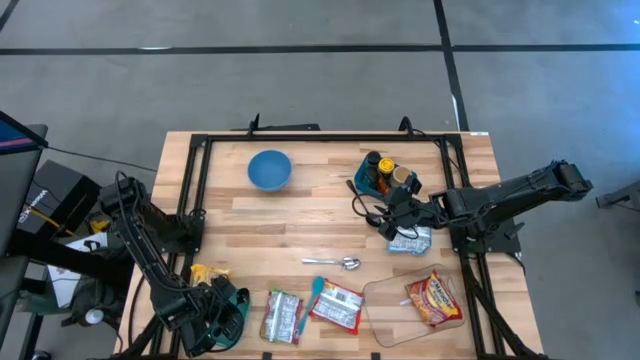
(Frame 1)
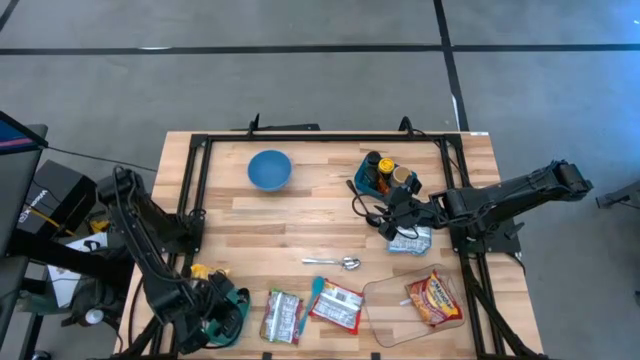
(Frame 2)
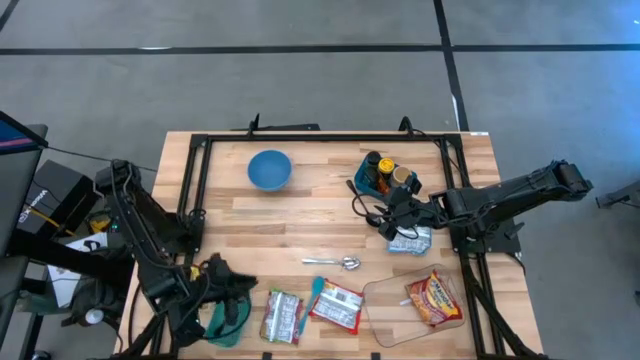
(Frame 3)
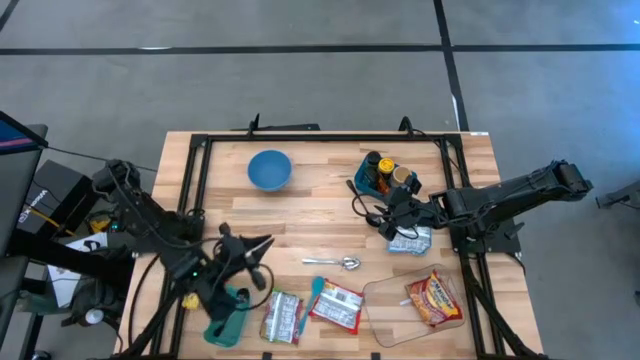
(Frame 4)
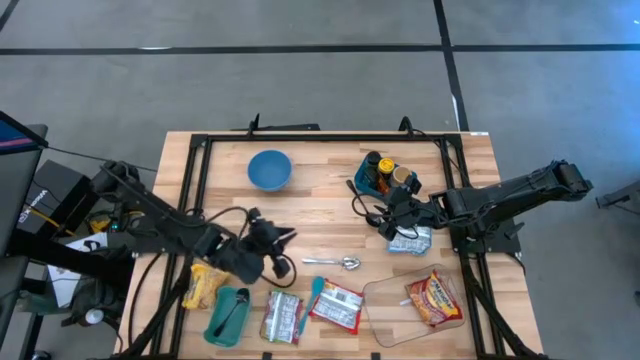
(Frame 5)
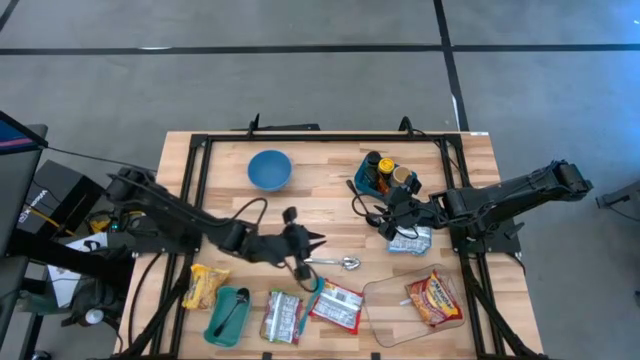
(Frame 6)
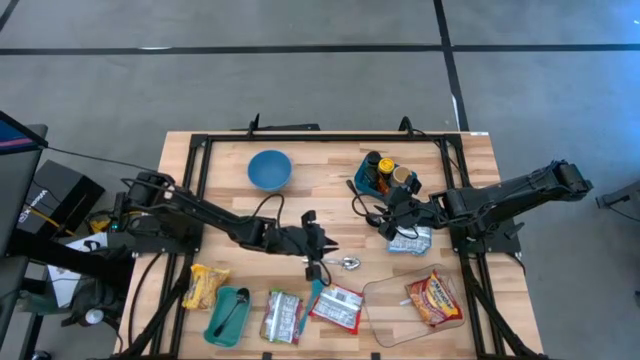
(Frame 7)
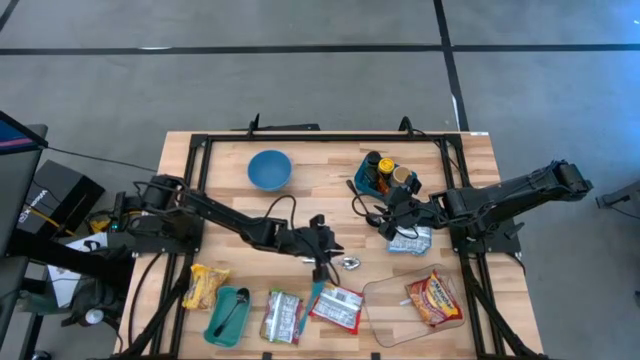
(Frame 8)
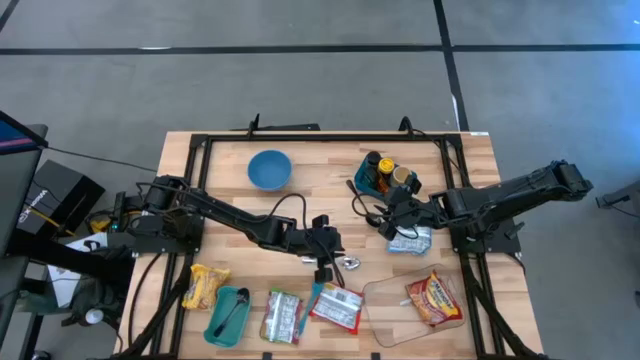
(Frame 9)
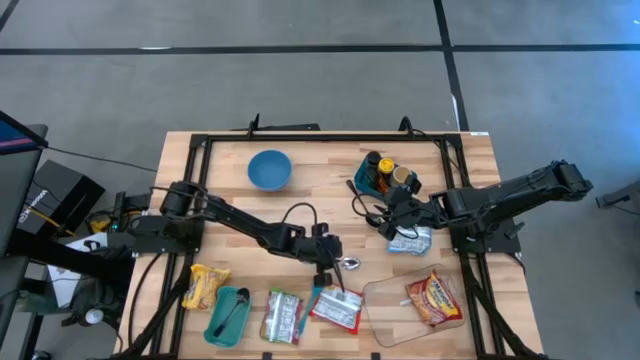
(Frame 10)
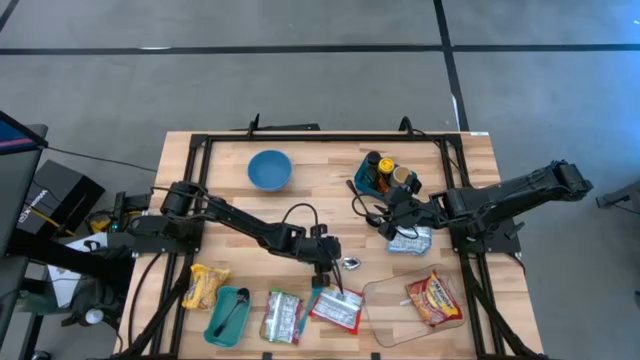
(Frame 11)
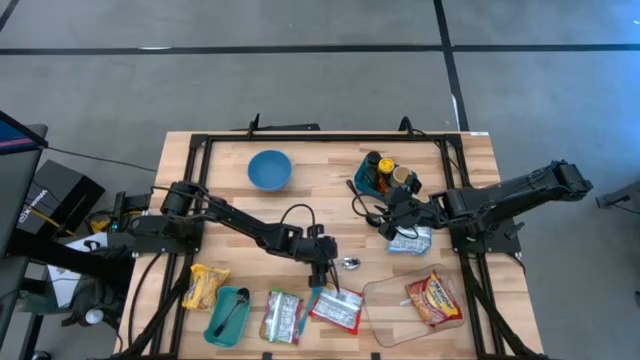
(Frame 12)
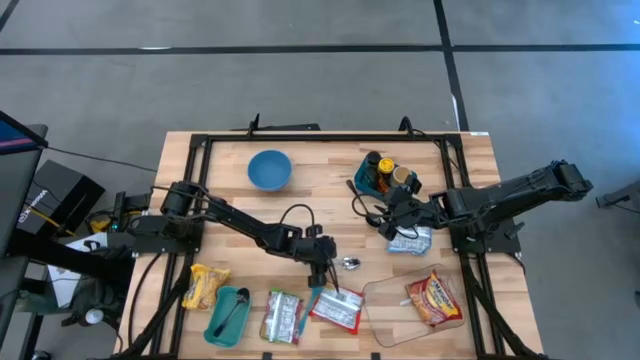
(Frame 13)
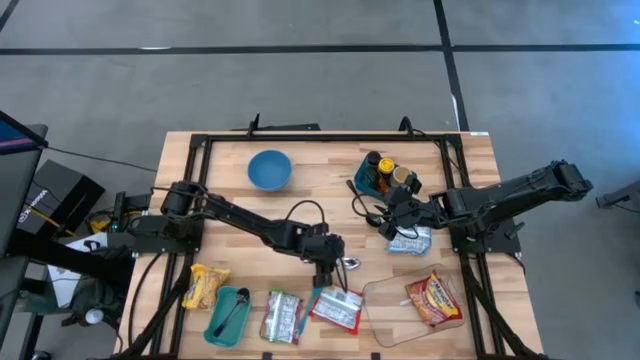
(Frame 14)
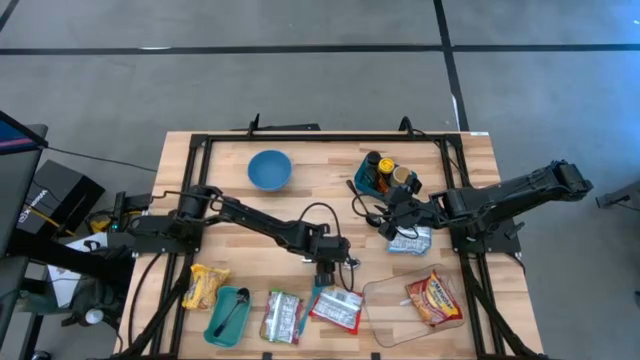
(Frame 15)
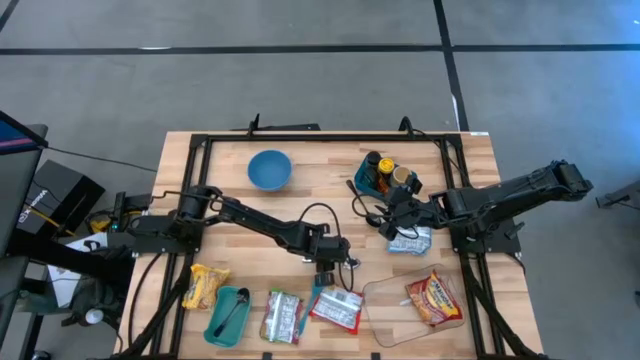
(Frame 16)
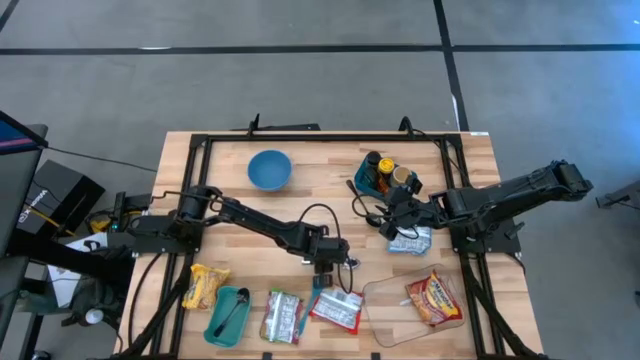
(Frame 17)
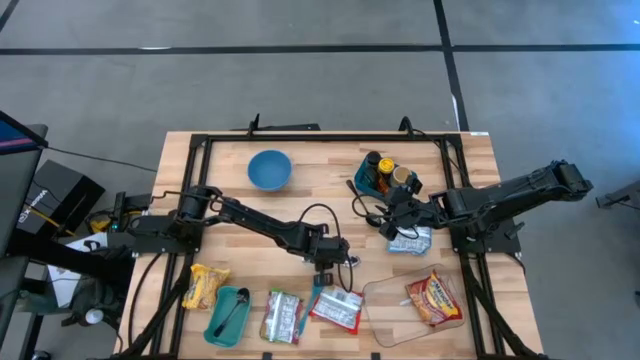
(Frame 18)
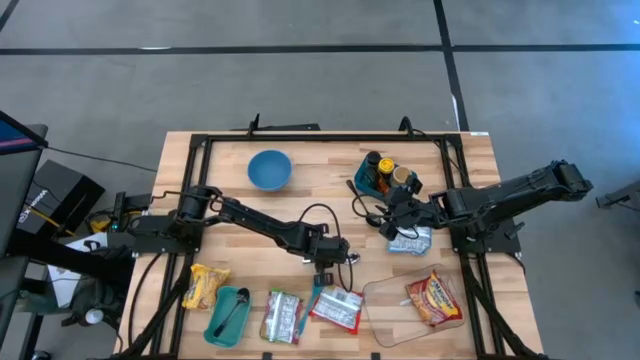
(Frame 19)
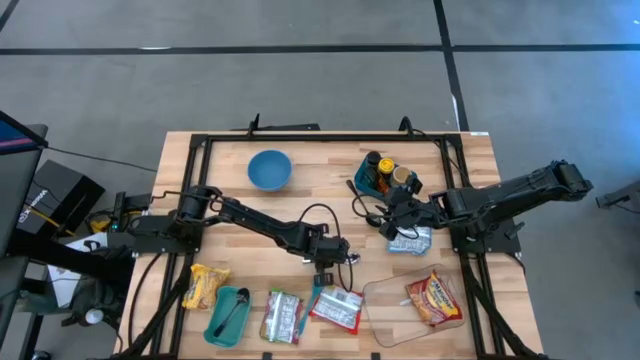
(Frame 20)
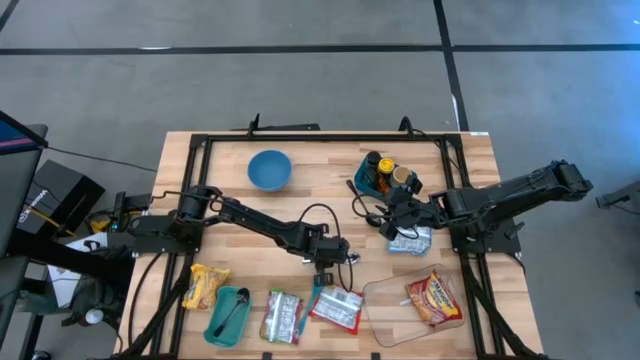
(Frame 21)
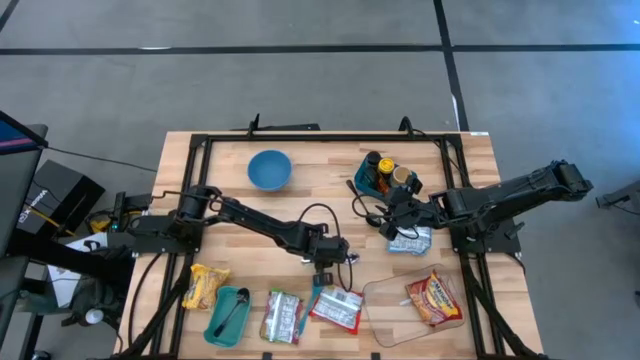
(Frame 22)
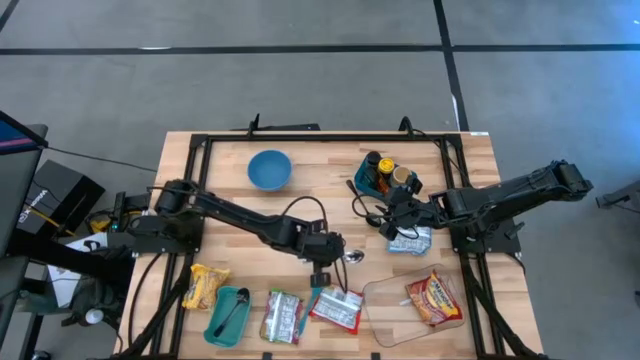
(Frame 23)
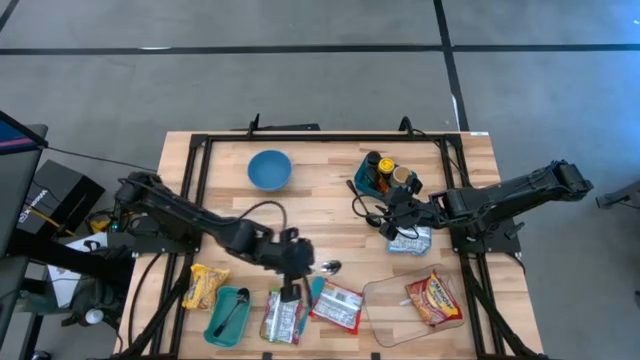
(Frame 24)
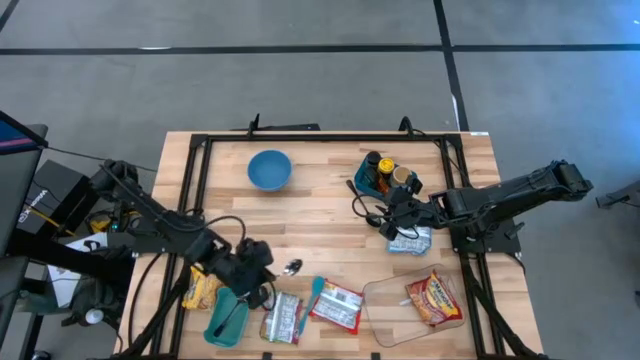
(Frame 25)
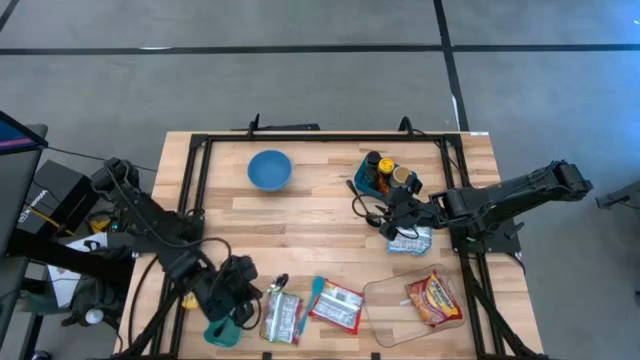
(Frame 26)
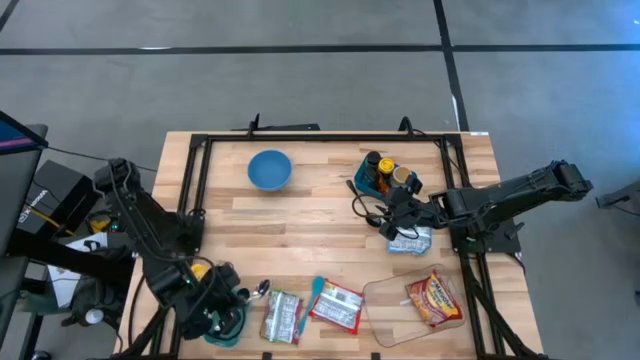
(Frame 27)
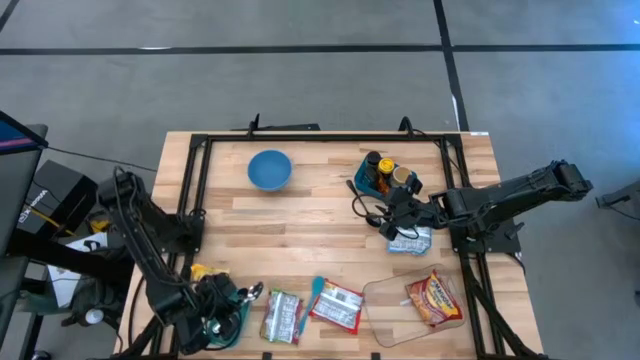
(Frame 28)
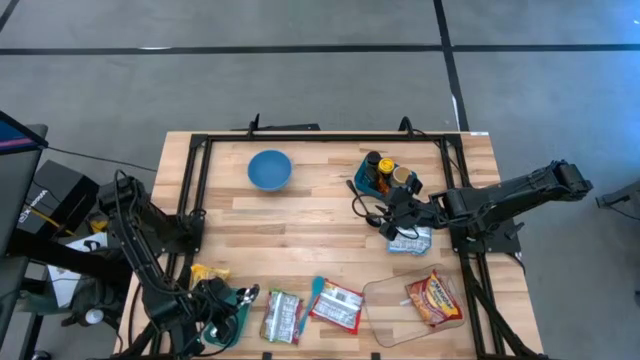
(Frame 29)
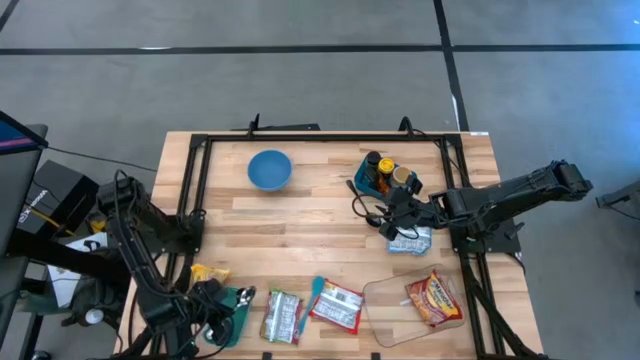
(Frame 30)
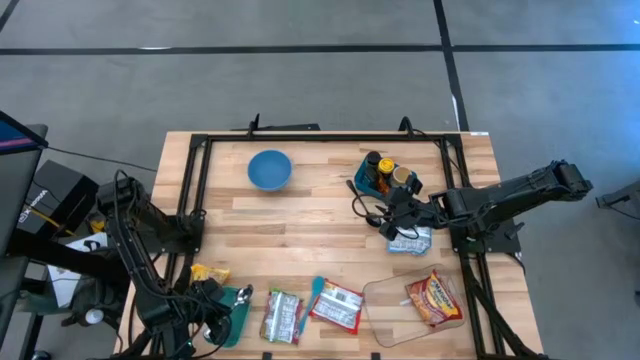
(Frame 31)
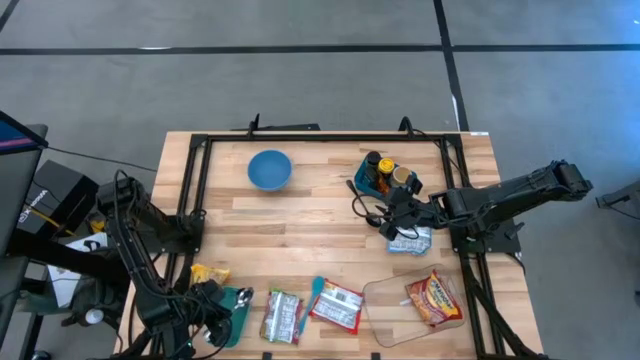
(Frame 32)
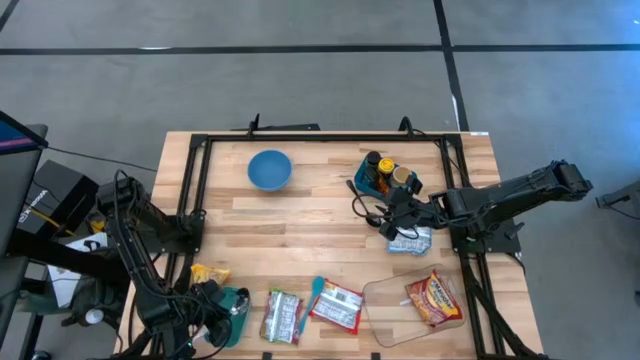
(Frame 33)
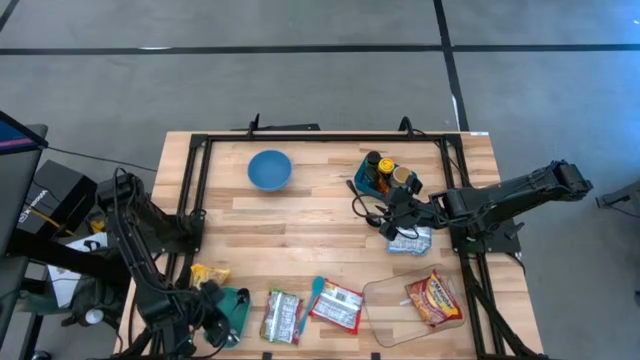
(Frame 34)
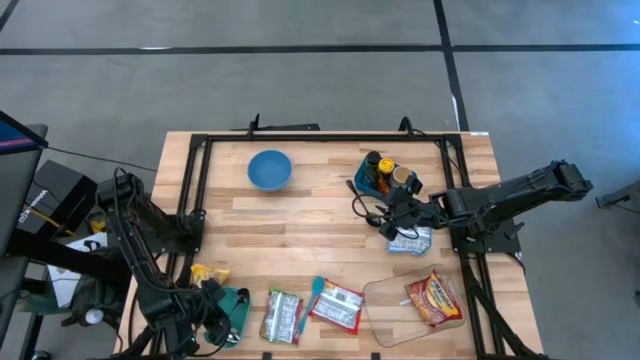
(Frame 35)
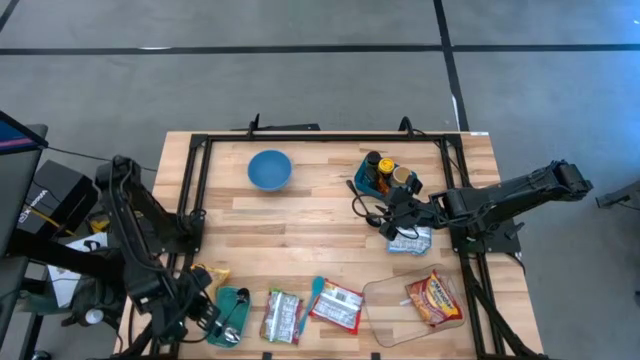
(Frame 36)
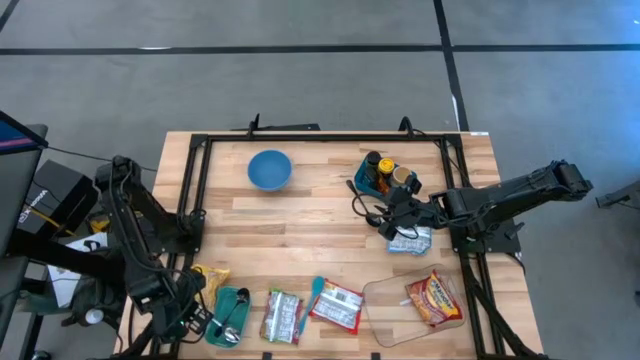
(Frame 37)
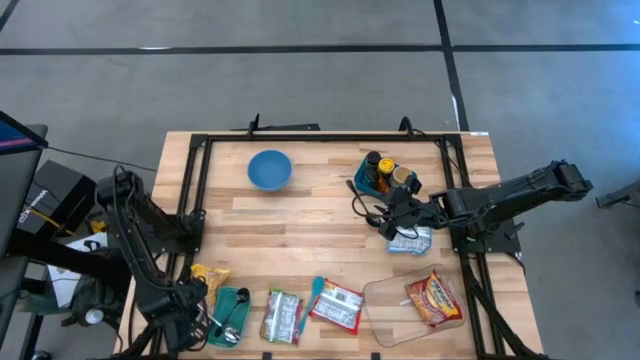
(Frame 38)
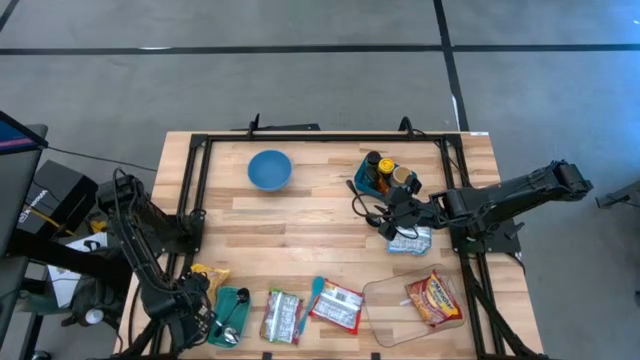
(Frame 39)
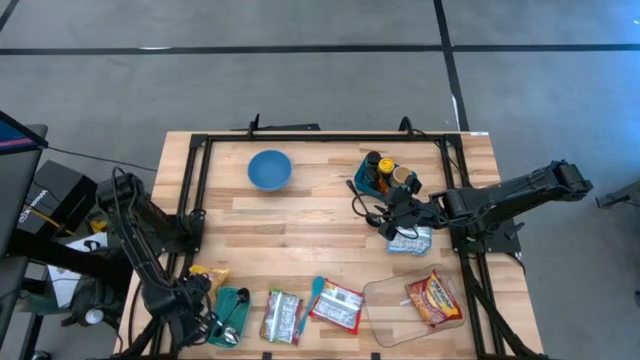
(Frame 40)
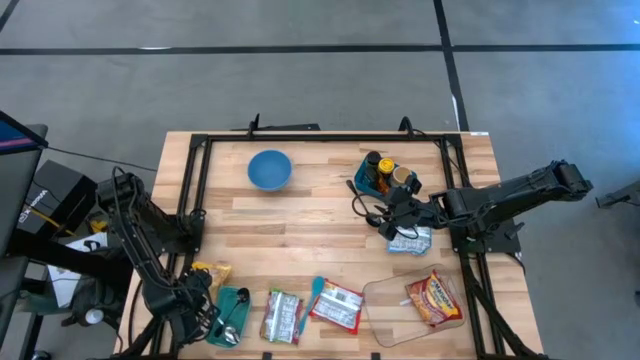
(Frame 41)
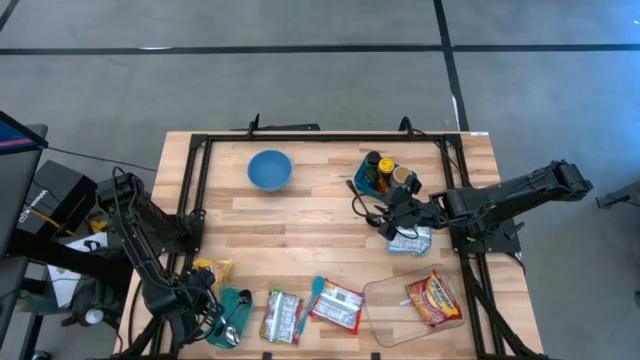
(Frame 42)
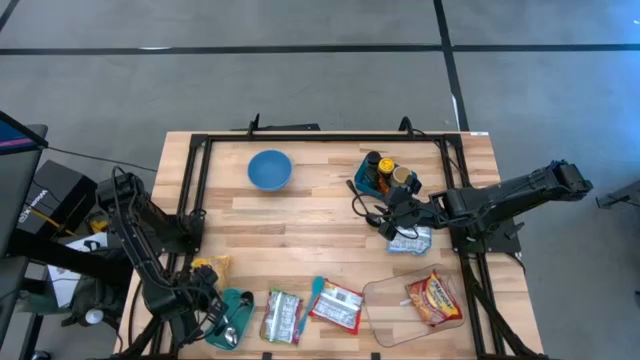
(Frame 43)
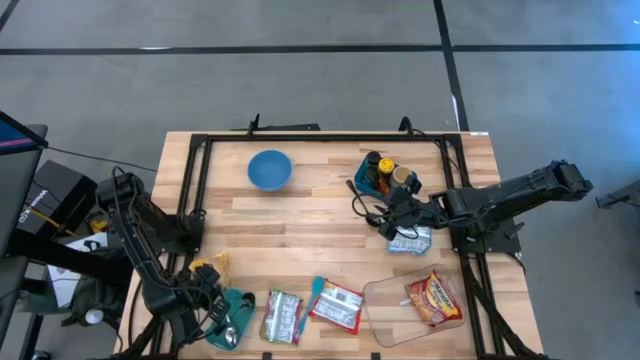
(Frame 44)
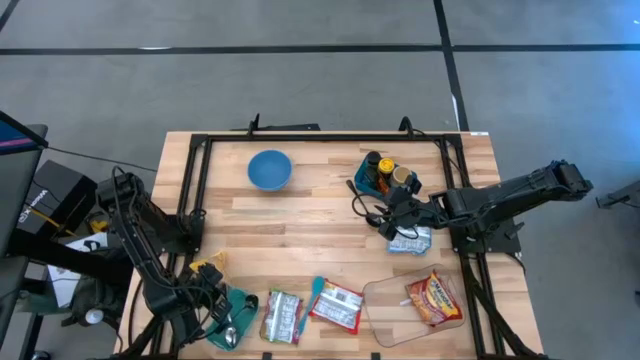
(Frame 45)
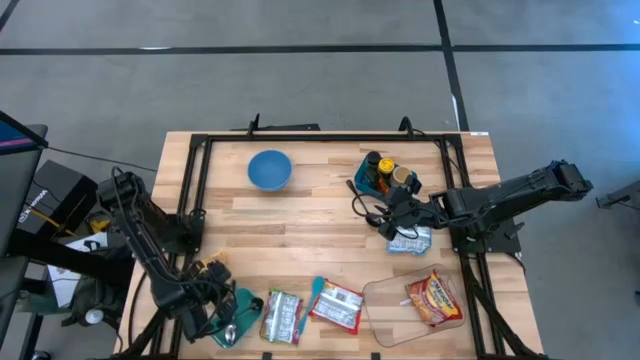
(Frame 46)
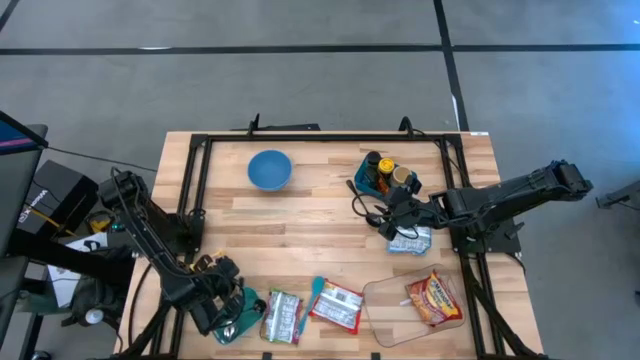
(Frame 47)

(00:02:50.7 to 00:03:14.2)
Task: Pick & Place Food Item
Put the silver spoon into the green bin
